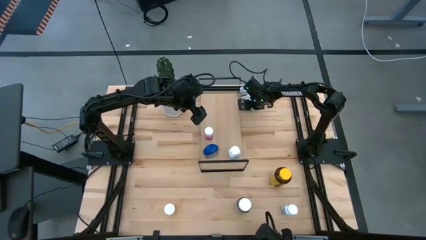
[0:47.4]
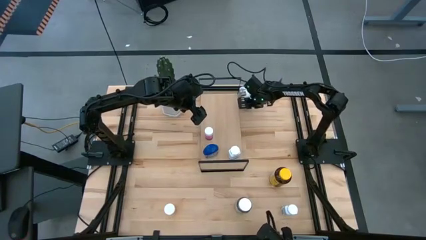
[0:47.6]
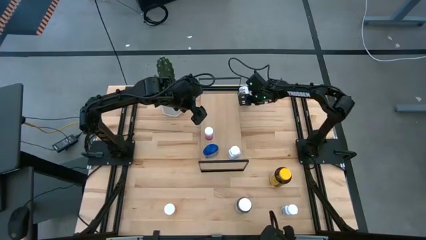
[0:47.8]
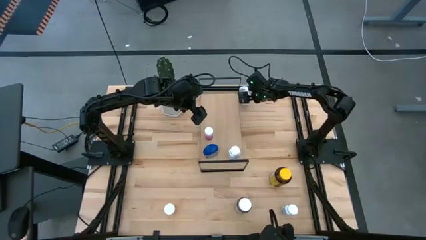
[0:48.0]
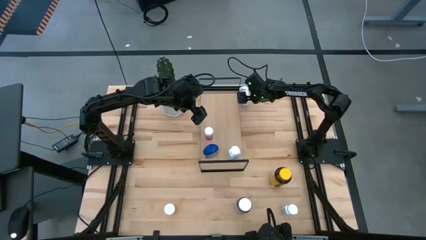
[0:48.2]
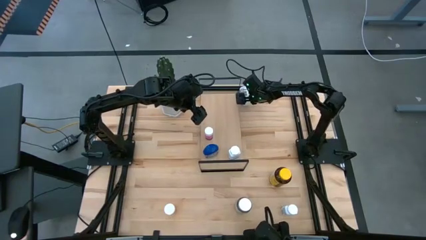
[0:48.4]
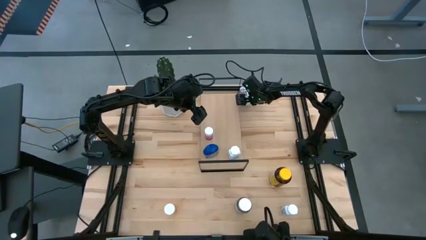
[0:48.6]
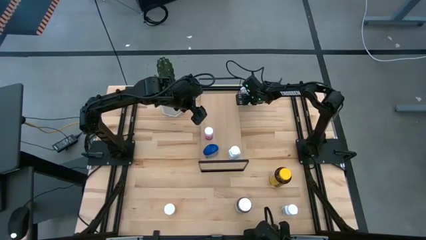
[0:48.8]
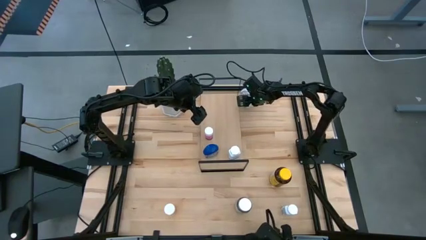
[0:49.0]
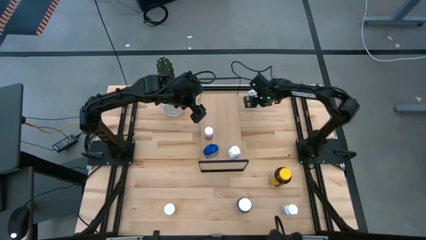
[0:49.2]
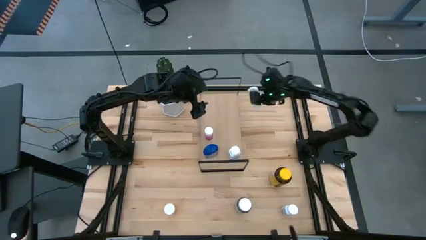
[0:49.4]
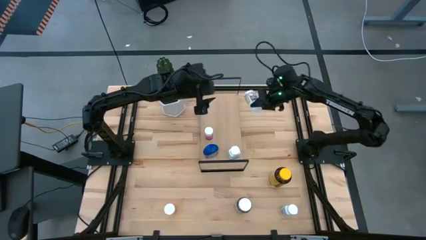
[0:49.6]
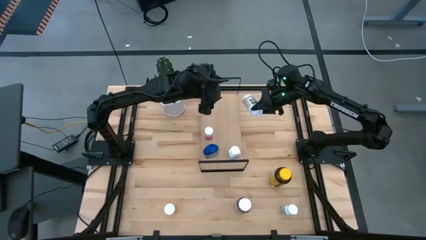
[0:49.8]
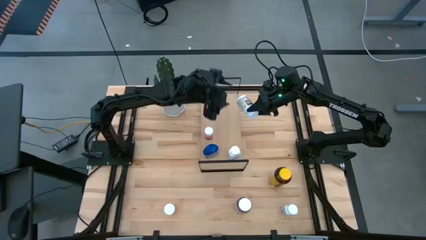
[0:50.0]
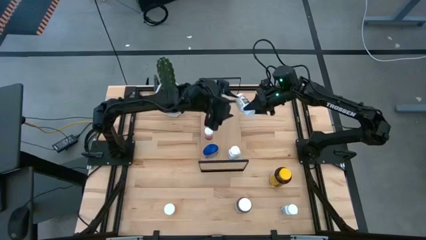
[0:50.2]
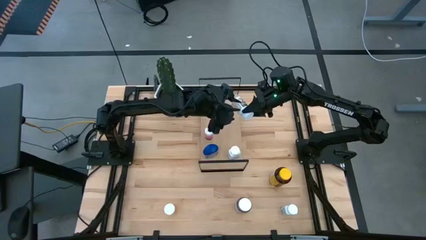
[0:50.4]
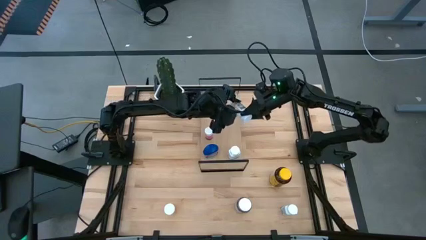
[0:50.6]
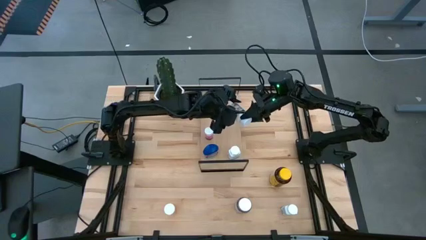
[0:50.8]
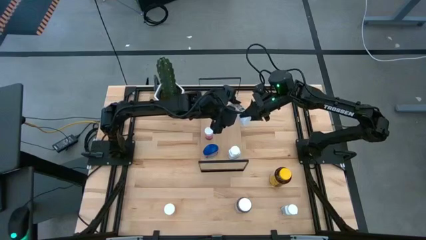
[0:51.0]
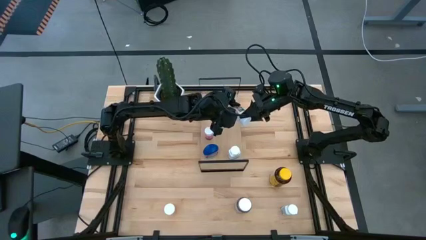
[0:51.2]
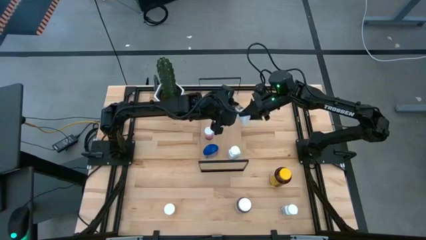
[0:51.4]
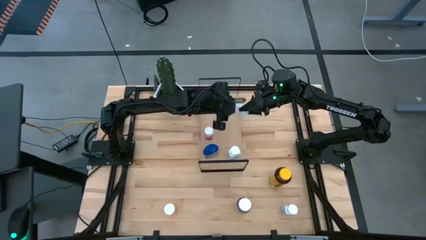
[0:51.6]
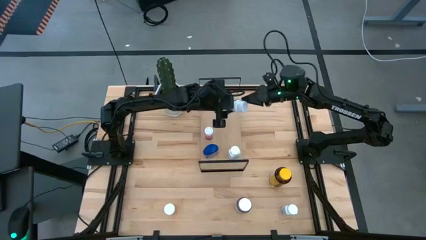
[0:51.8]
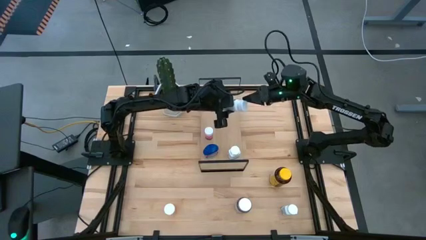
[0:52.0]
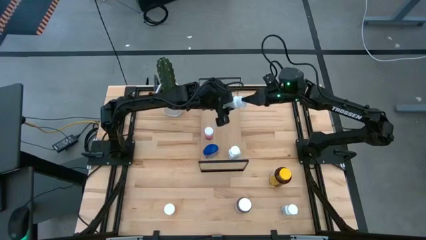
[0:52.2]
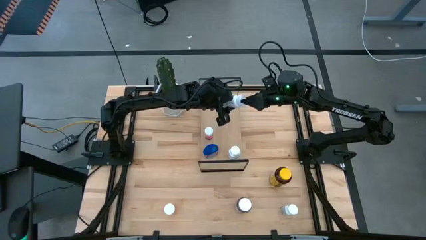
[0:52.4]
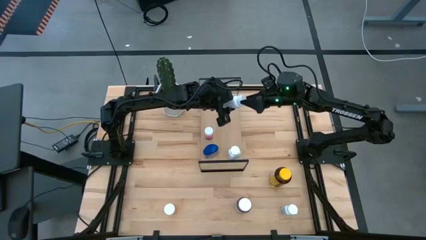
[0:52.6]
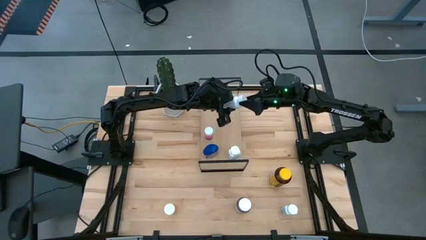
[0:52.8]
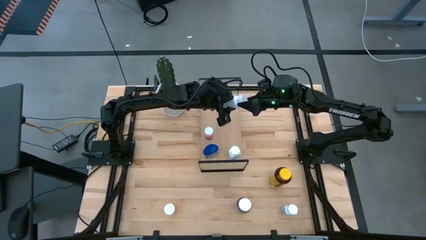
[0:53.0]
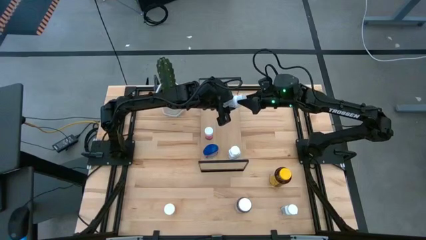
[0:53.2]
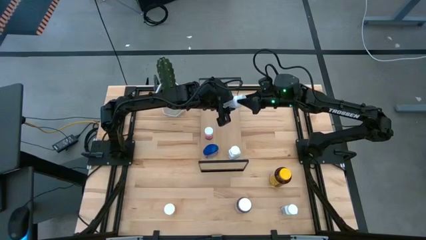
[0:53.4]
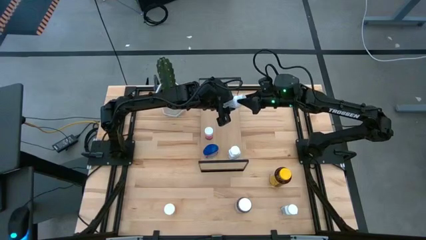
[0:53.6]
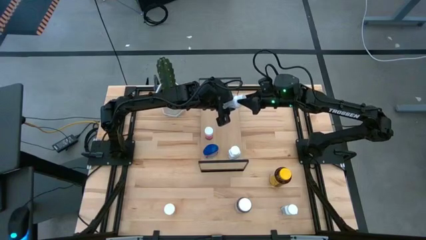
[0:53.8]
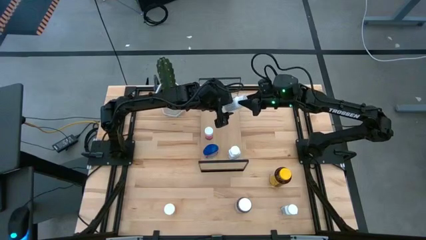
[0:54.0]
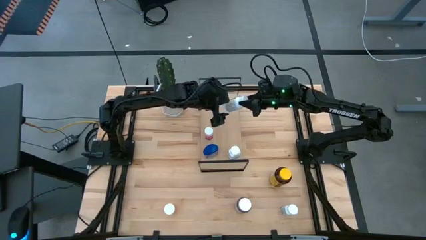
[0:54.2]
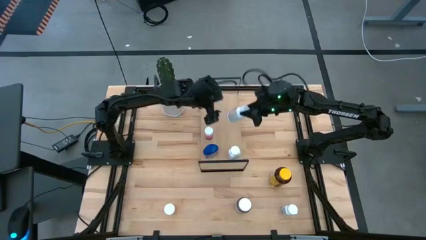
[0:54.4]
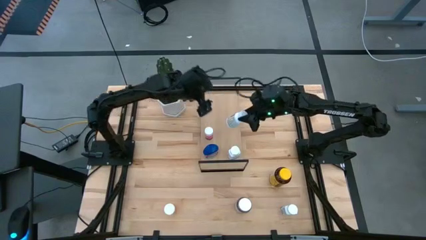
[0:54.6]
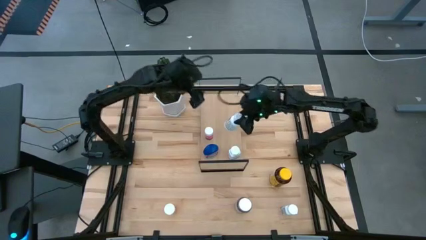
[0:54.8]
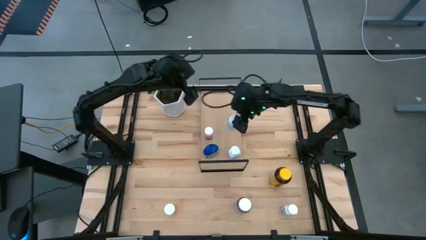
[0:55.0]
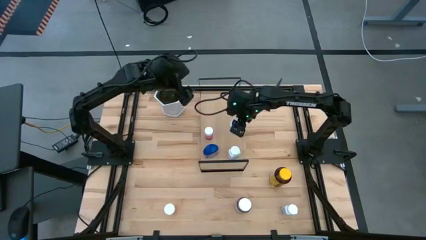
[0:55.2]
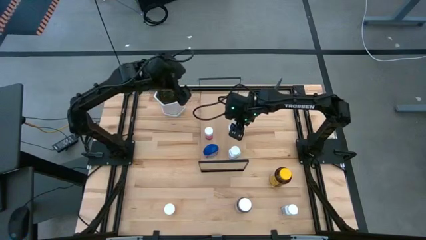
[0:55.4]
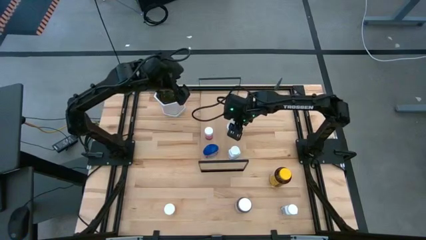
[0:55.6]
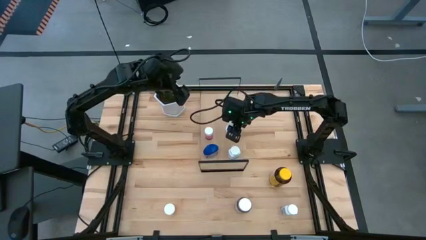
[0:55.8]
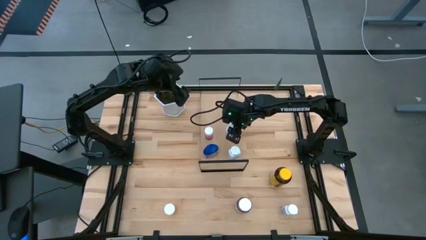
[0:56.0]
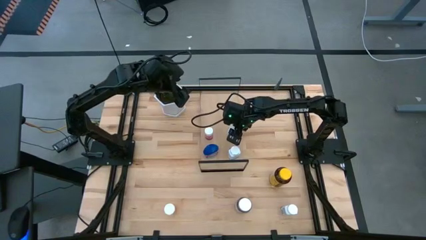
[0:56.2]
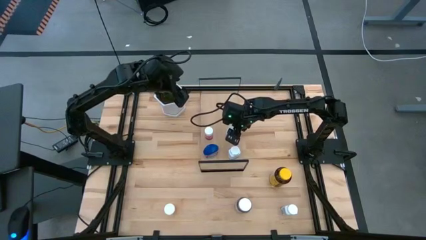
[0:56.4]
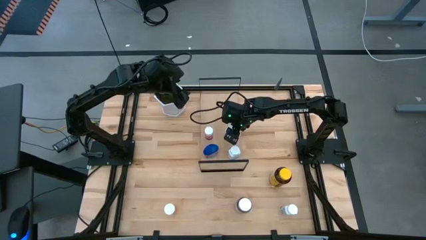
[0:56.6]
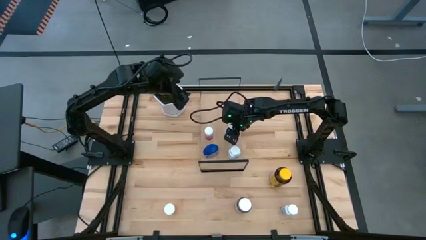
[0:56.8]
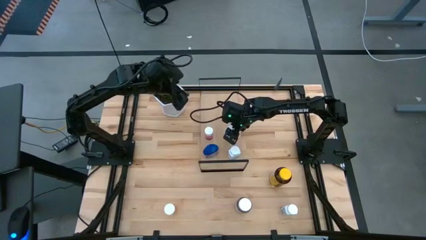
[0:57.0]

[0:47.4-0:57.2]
Task: Pick and place medicine bottles onto shelf by color
Put the white medicine bottle on the shelf

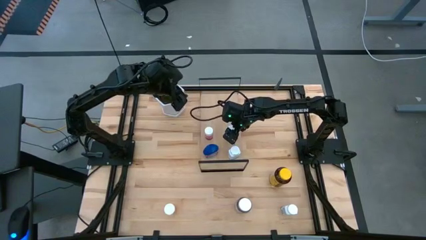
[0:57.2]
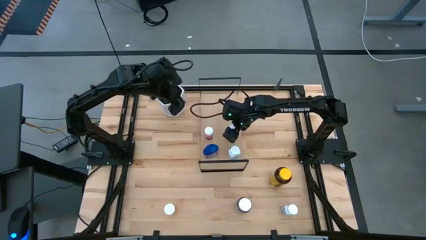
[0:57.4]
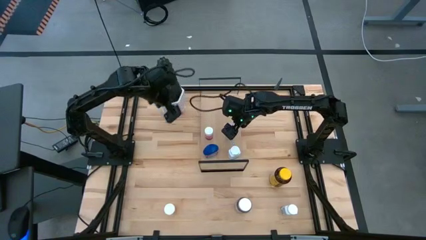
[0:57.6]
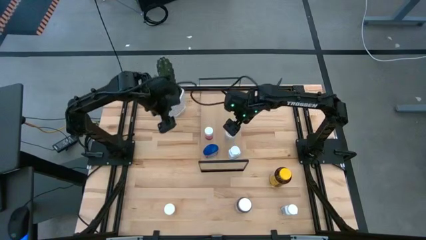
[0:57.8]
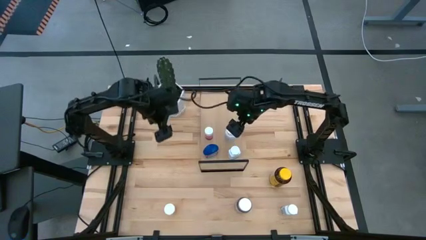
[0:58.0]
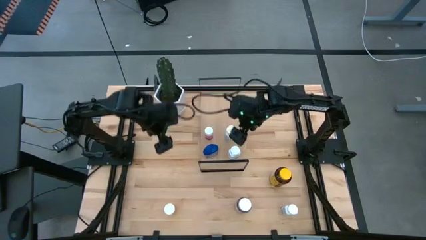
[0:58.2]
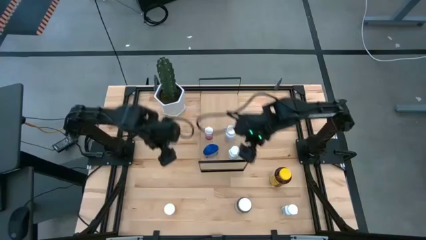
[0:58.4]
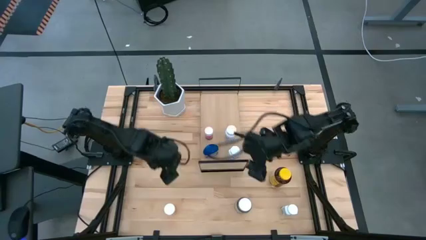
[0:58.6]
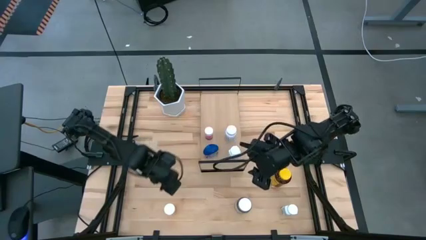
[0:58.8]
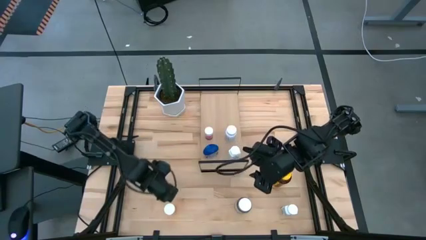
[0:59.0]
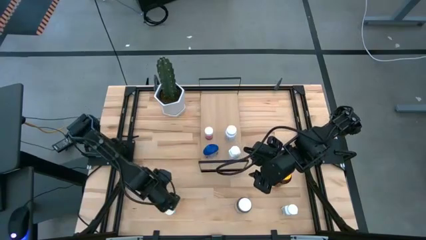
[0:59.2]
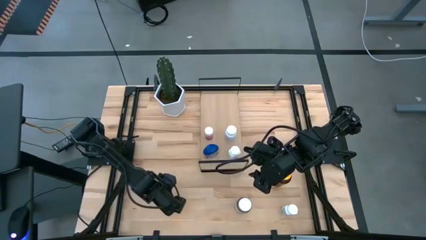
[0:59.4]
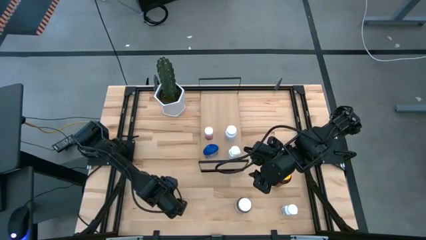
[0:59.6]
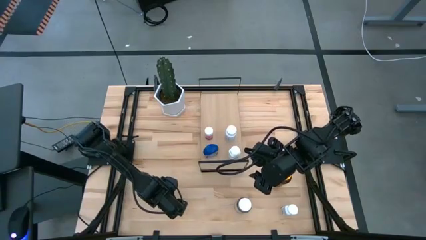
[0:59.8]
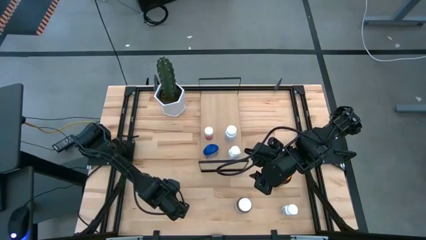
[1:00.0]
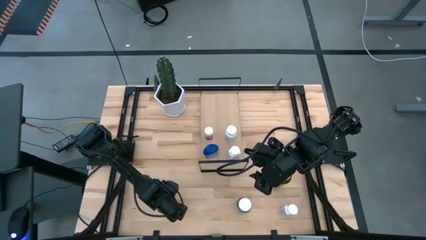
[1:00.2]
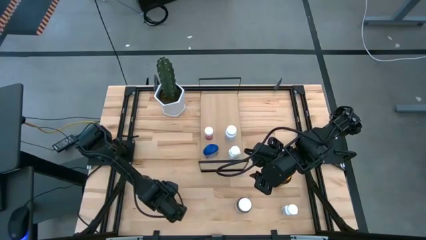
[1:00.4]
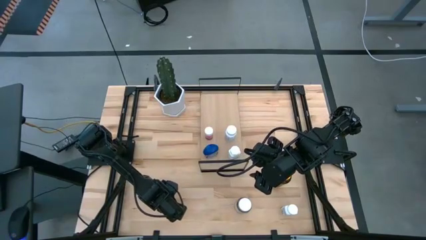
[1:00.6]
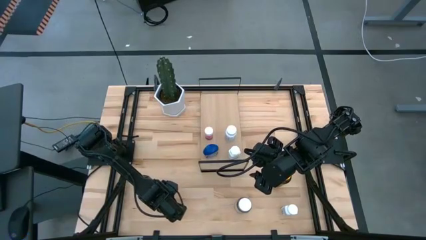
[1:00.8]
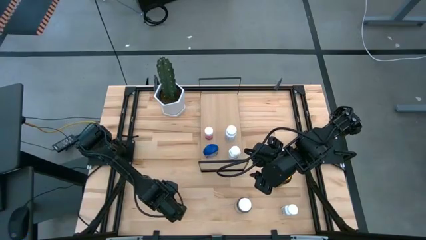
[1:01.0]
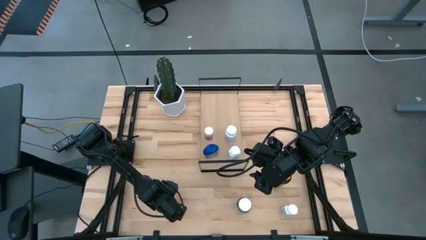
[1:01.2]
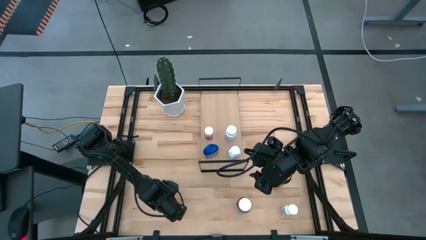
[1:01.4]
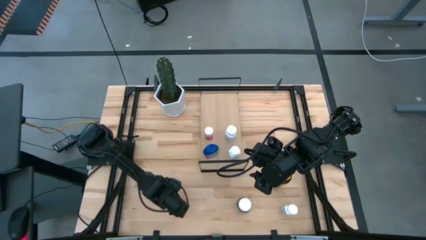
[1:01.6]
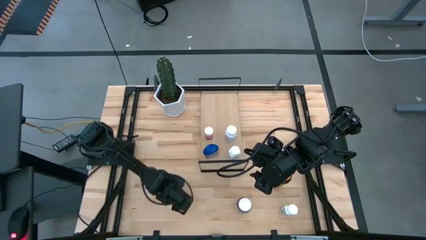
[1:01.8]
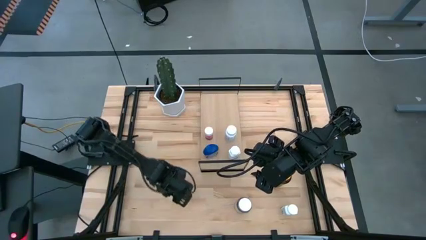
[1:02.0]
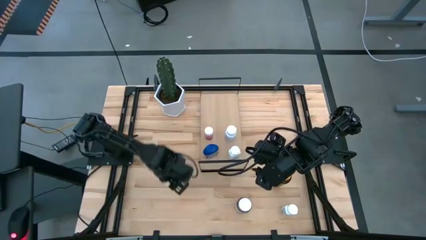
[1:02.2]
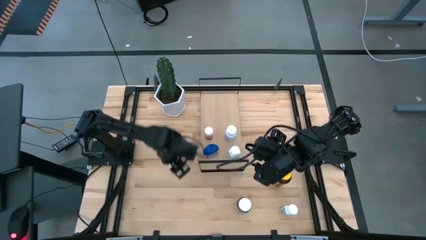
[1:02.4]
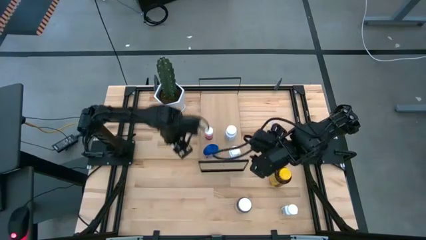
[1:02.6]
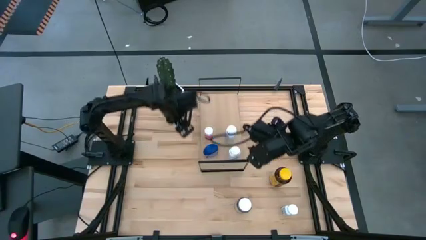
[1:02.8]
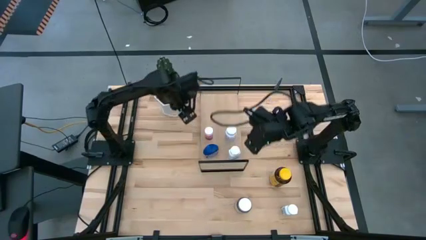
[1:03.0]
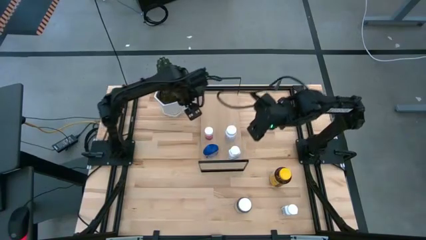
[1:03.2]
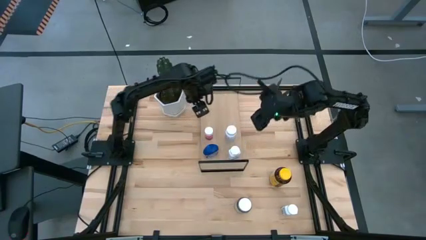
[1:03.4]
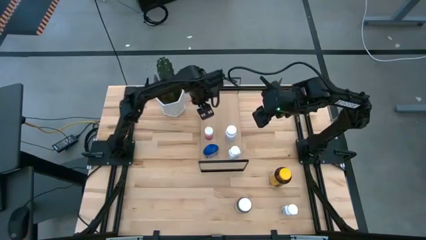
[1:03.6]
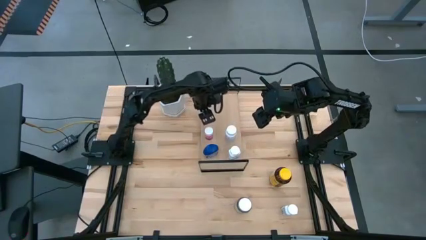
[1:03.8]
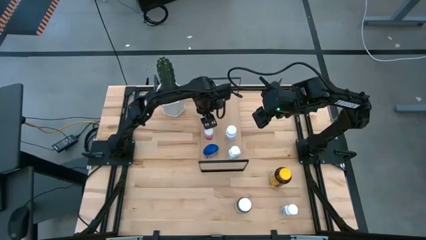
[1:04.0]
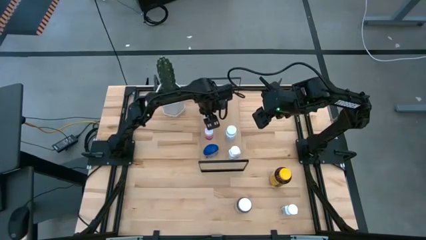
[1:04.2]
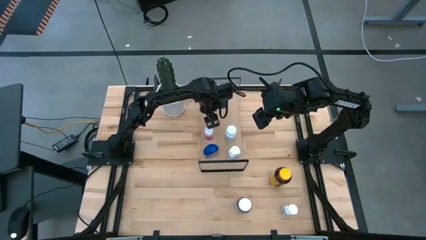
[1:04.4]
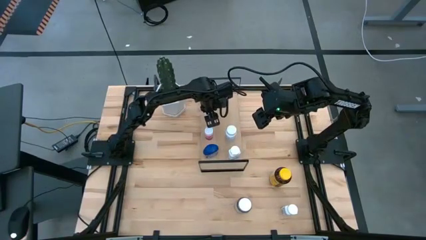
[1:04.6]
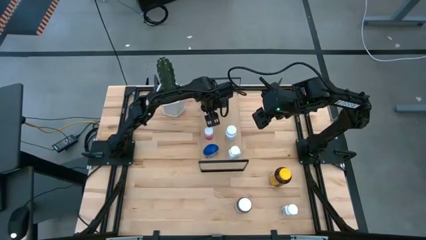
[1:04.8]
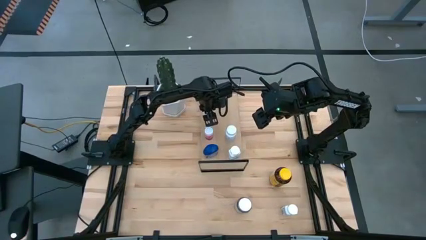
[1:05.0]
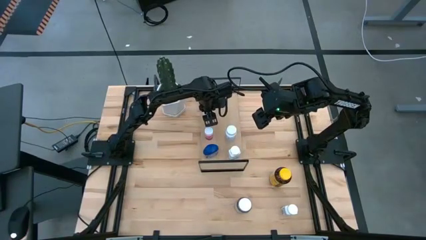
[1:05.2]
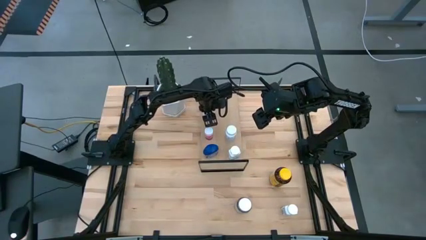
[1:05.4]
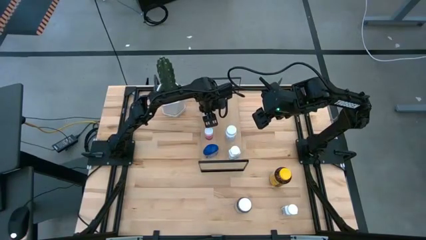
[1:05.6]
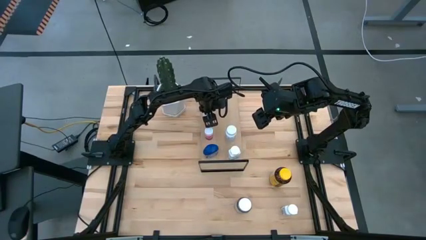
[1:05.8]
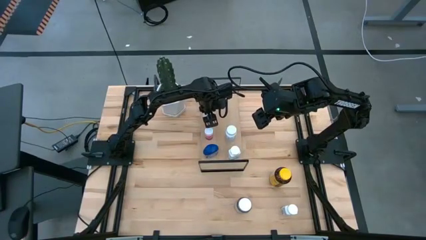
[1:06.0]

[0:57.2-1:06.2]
Put the orange medicine bottle on the shelf
